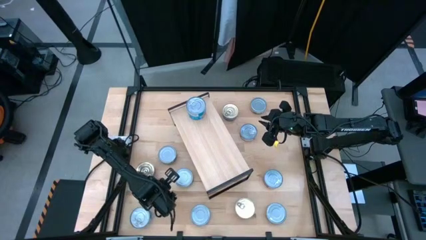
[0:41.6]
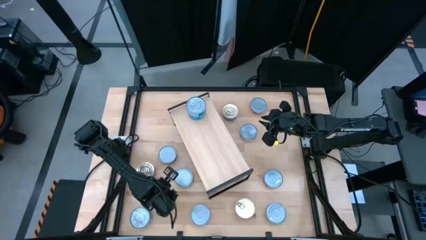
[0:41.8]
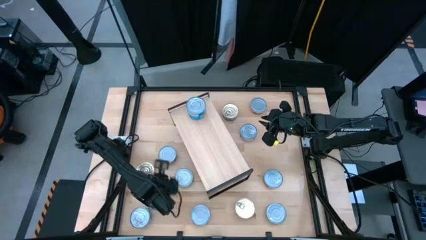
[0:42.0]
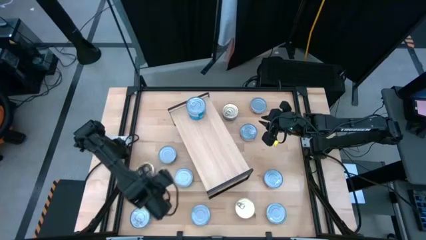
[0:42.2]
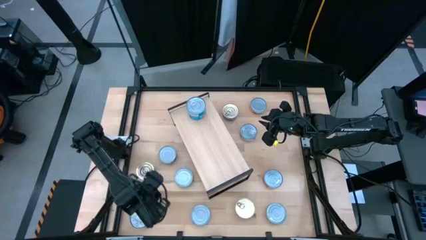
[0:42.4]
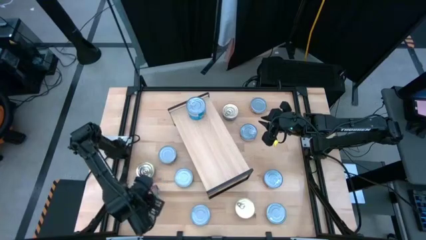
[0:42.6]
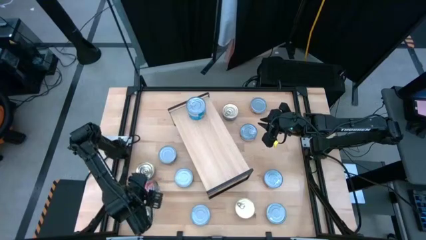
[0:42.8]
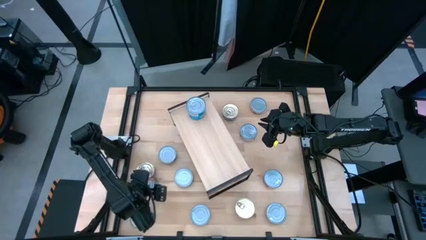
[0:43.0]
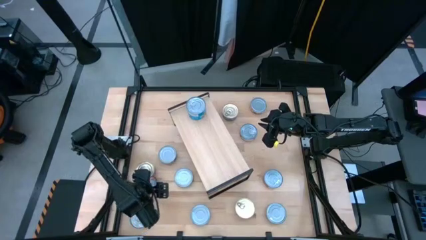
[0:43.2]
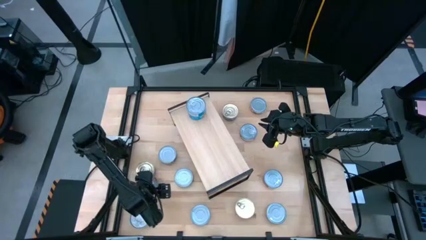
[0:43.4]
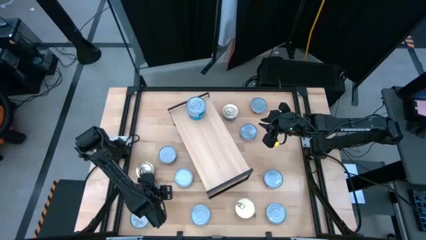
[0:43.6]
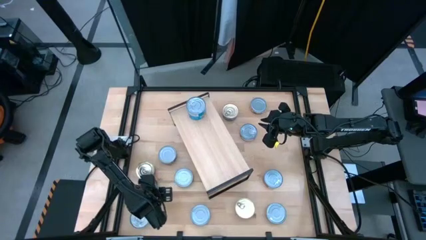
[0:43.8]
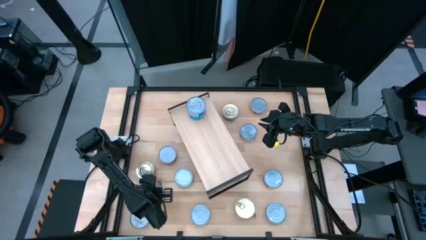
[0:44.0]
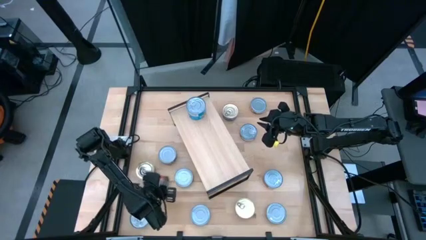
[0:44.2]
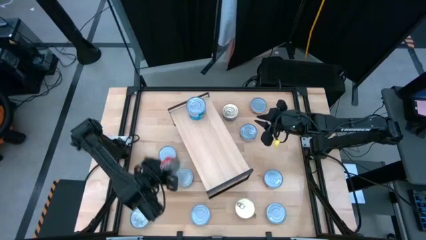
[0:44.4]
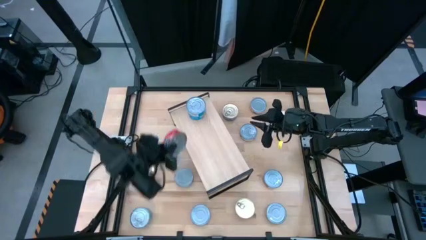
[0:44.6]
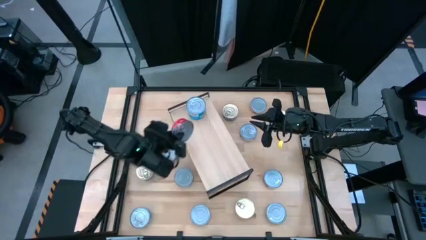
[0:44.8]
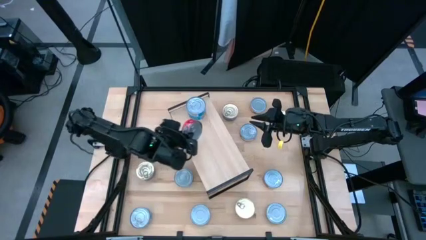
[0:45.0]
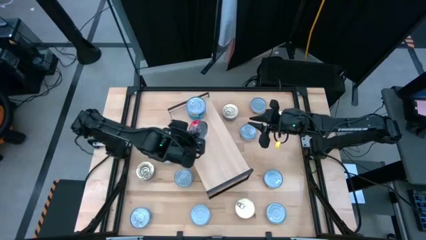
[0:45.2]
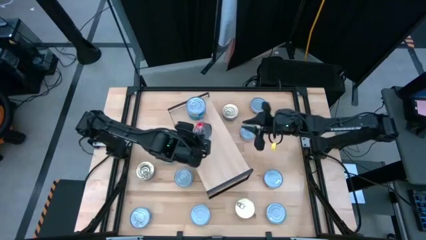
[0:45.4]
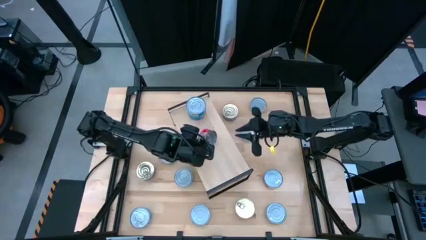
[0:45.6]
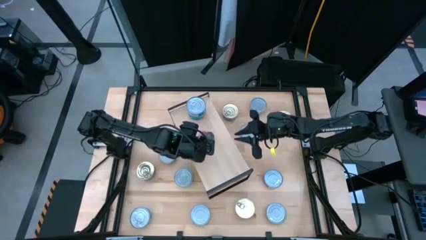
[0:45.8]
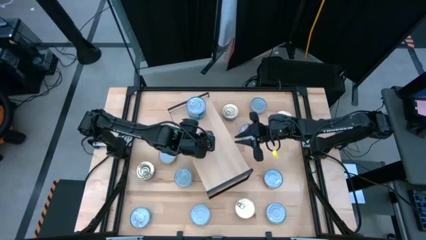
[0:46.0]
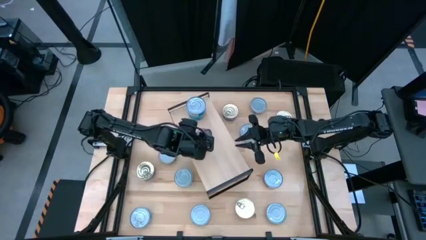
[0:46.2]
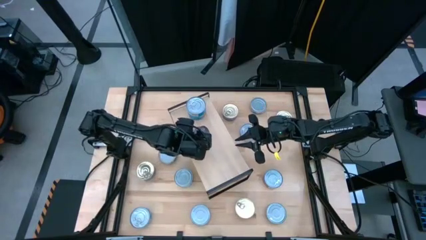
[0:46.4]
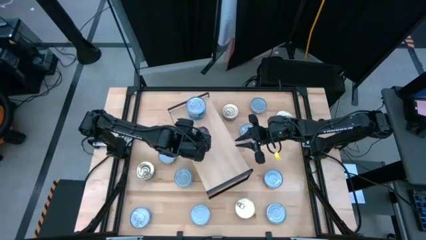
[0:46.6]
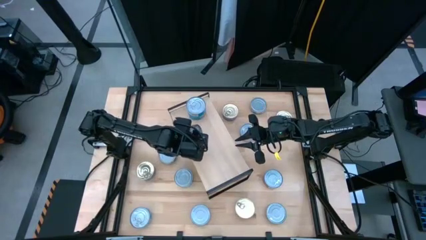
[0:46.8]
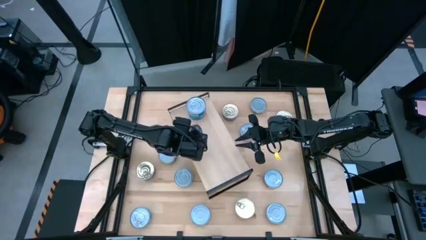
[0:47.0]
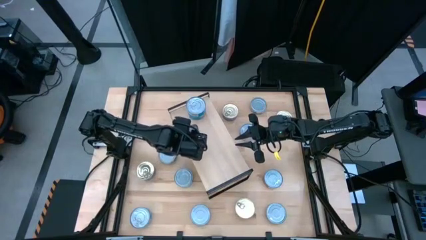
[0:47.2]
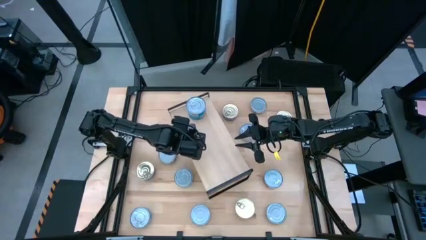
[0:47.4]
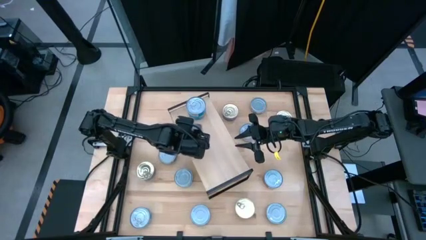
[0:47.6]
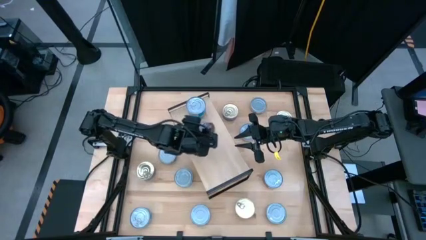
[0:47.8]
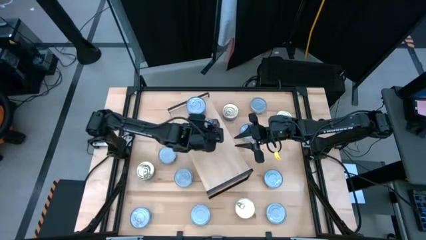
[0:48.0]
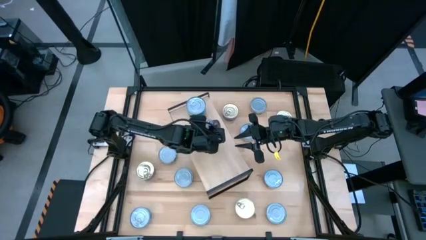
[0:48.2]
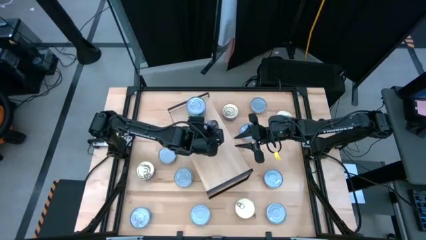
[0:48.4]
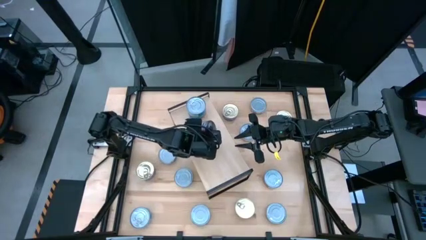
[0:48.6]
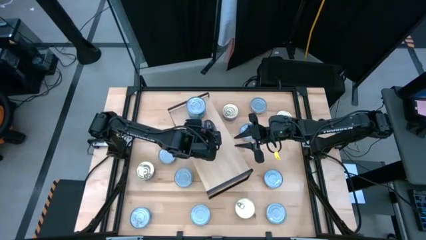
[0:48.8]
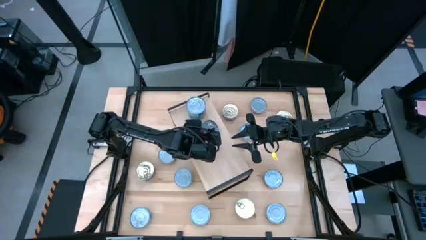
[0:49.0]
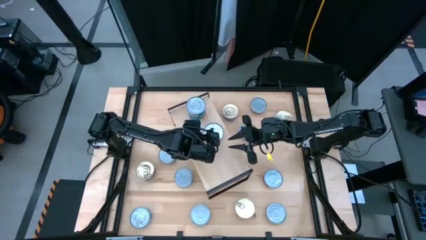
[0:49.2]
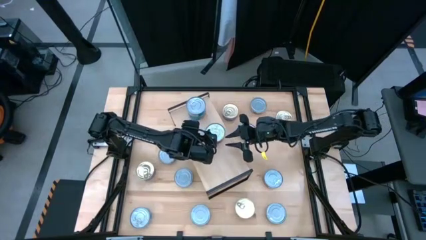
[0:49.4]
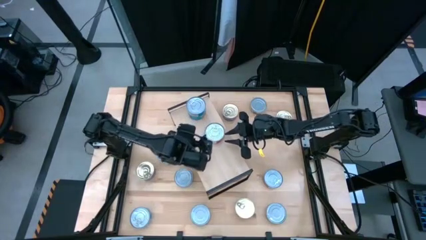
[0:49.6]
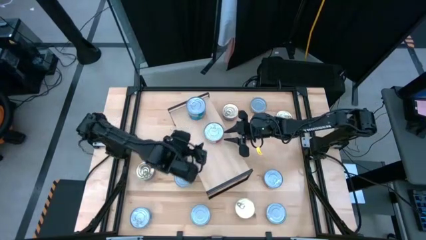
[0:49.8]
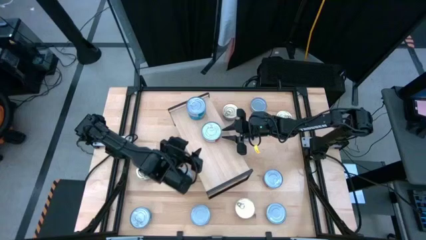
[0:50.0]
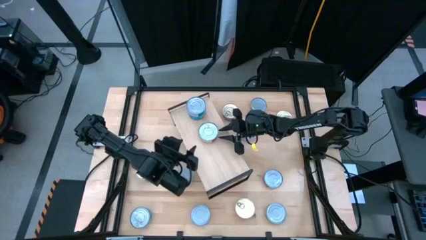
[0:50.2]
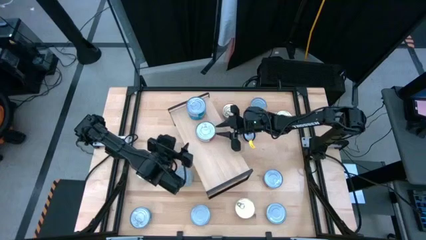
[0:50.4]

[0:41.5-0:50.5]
Task: Stack canned seafood by type on shelf
Put the red tuna can on the shelf

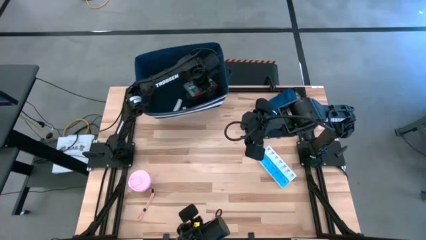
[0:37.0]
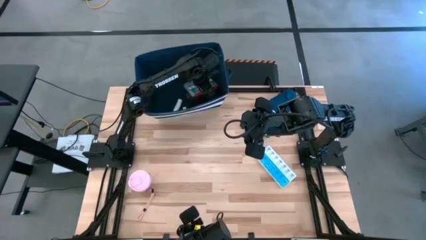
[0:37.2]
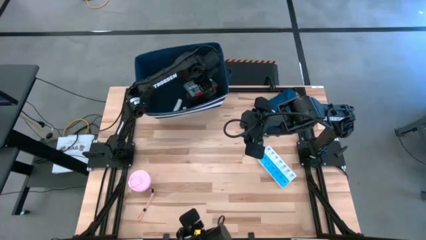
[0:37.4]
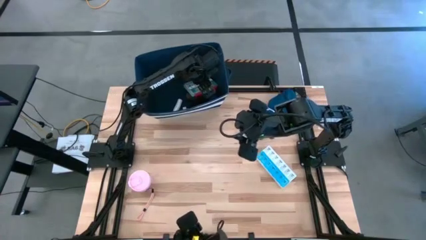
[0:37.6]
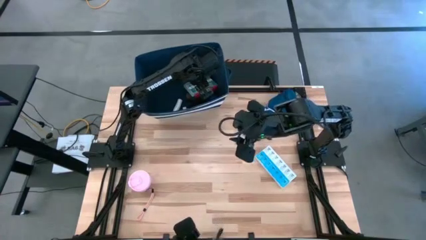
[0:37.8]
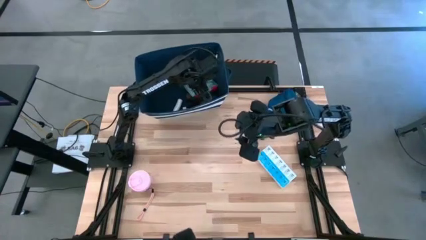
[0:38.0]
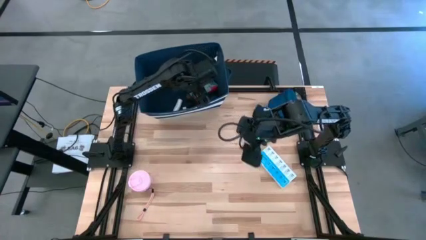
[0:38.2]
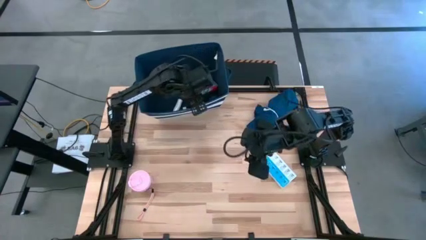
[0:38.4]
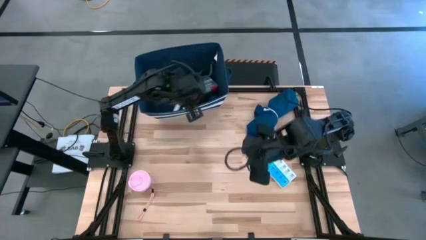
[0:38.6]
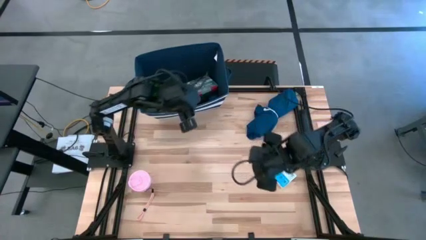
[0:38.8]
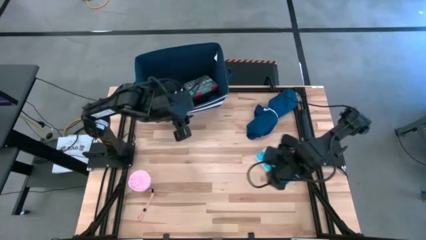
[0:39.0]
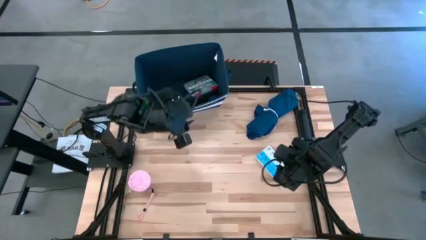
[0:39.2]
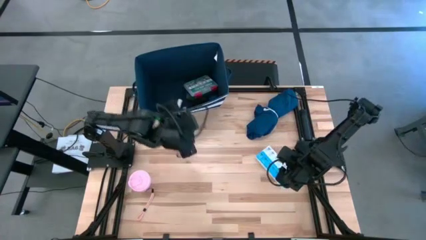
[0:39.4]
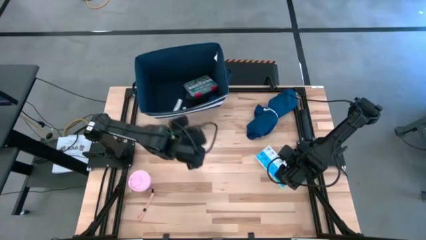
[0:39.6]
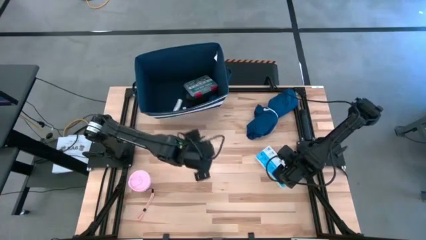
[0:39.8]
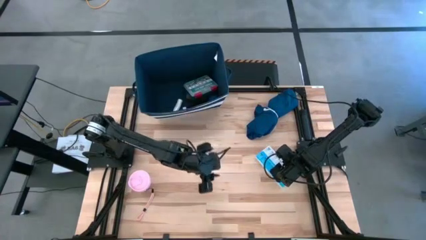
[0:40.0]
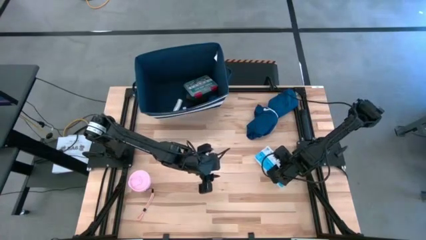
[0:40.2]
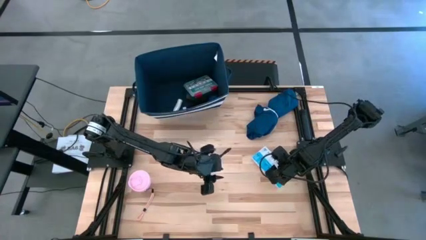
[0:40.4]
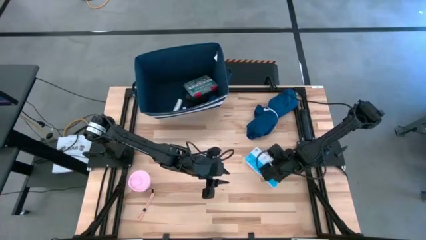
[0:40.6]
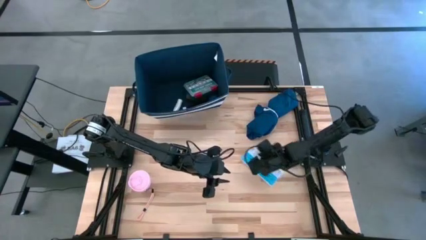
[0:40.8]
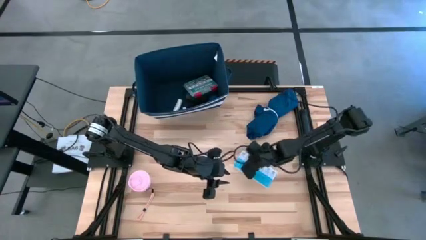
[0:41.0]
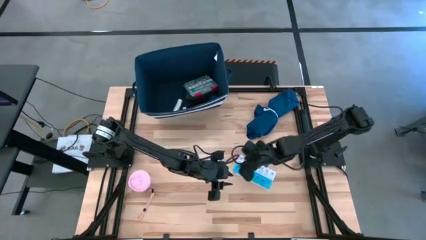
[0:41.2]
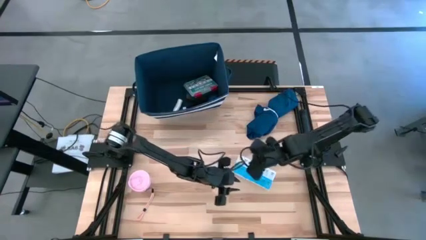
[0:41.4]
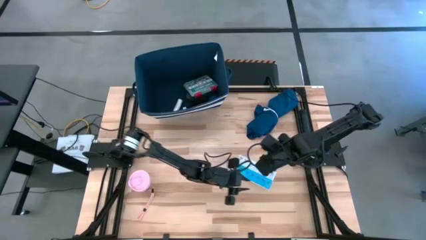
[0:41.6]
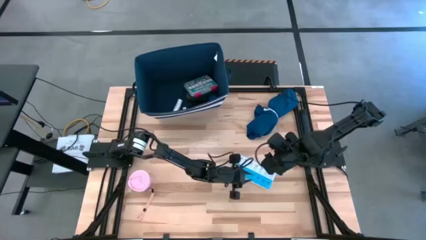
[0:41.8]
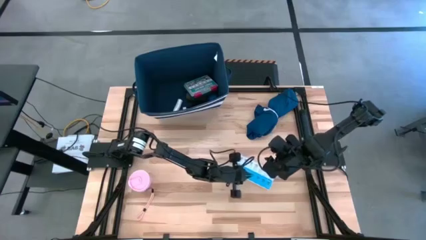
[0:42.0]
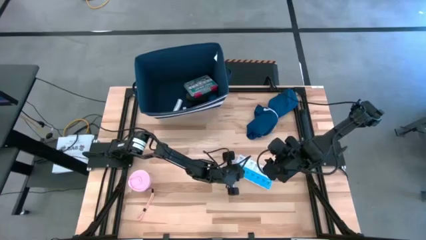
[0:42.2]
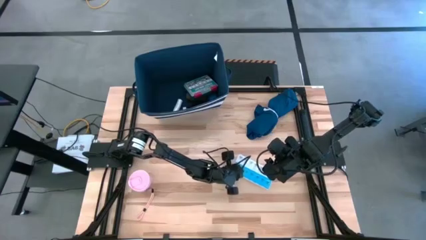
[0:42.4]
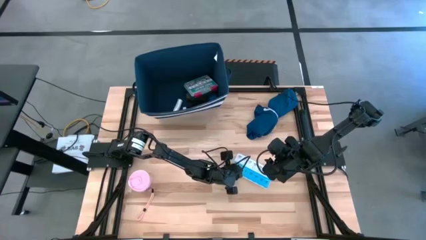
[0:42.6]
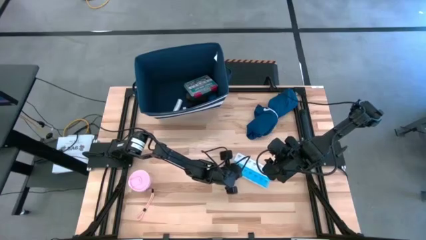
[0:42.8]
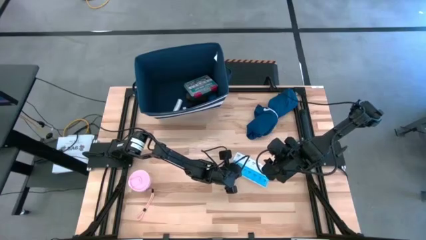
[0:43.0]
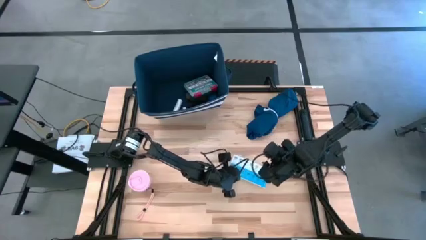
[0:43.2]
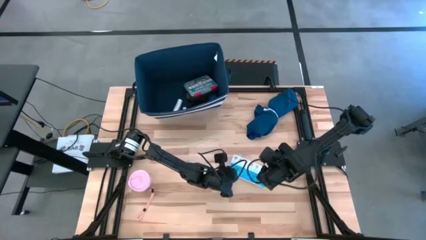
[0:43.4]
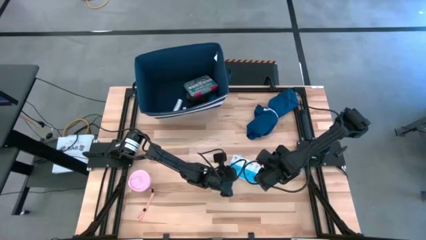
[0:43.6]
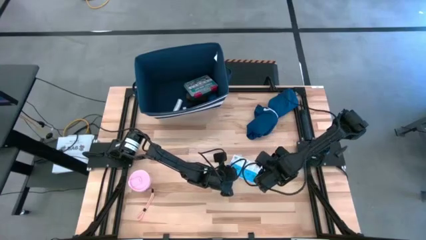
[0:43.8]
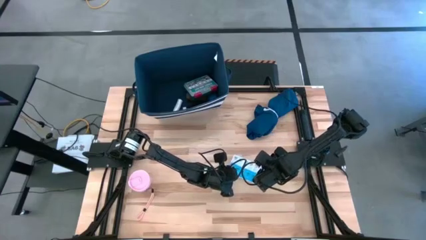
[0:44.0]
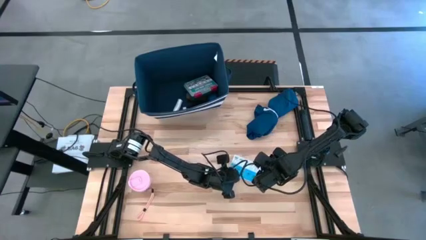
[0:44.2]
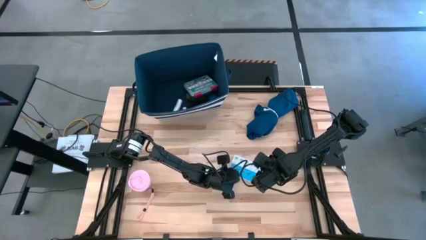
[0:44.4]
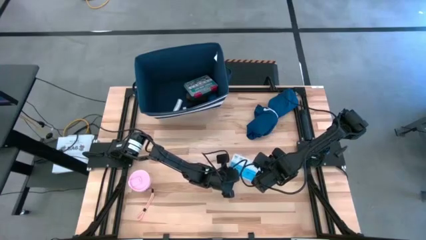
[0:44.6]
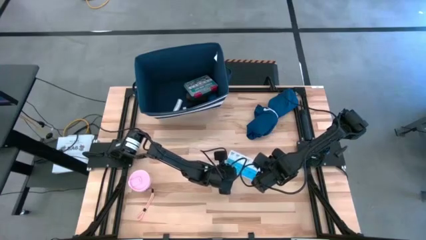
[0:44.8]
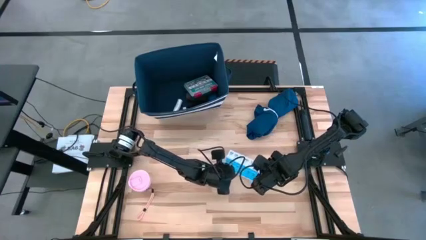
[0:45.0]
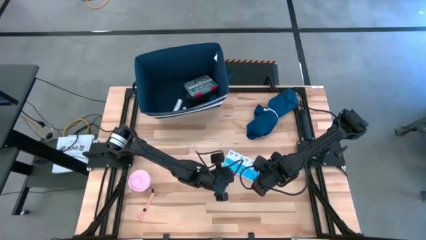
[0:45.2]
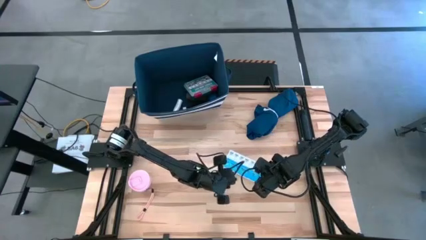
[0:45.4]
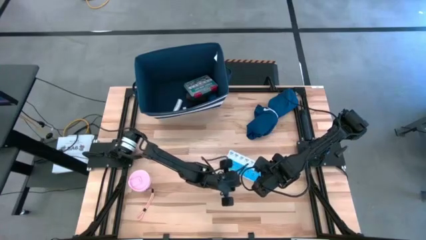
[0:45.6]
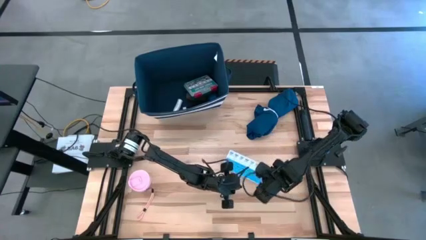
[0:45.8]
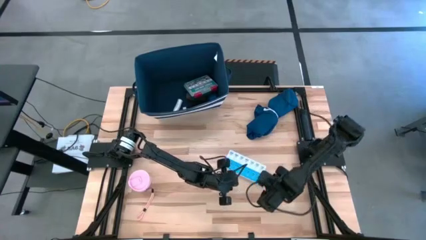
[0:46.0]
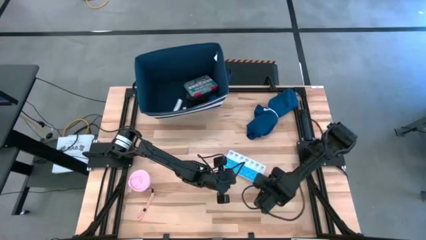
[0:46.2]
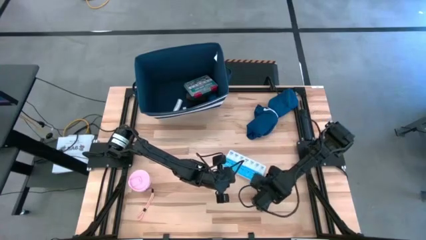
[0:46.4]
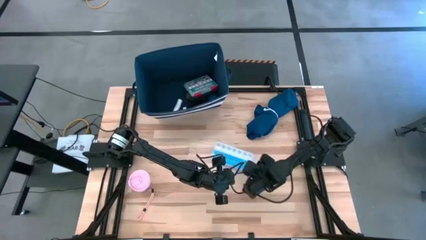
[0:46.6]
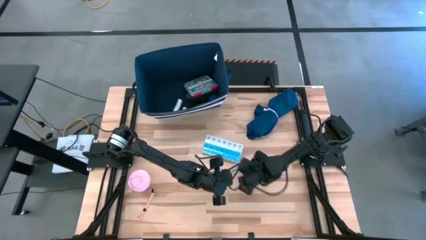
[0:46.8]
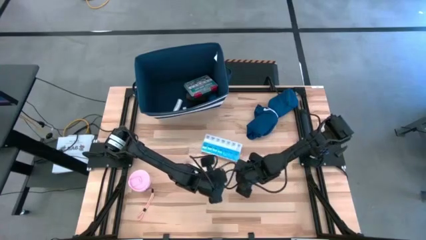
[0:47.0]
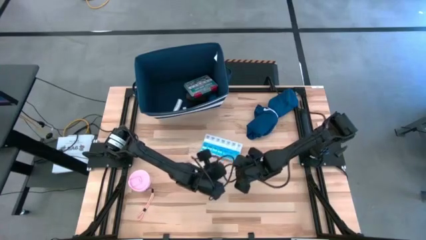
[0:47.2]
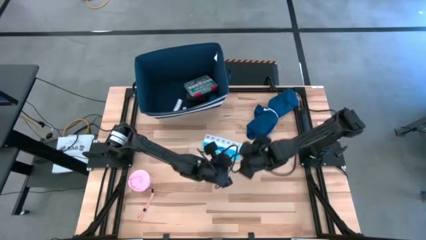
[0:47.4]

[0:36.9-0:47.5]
Task: Pick & place medical supplies in basket/bin
Put the blue pill organizer into the blue bin
